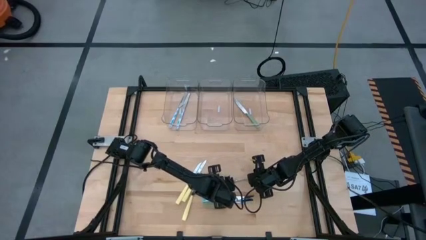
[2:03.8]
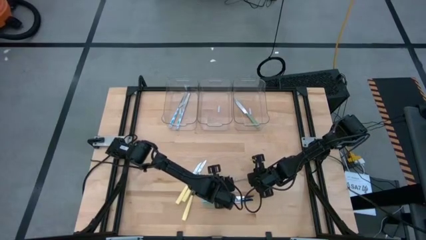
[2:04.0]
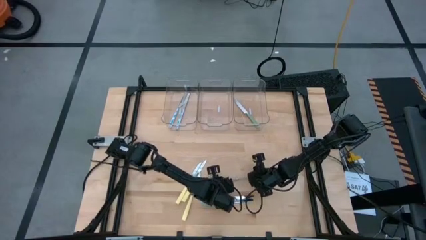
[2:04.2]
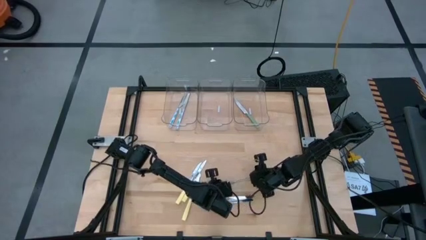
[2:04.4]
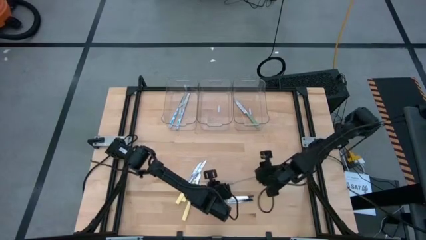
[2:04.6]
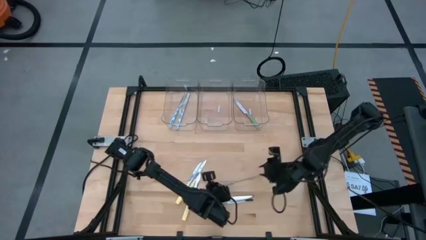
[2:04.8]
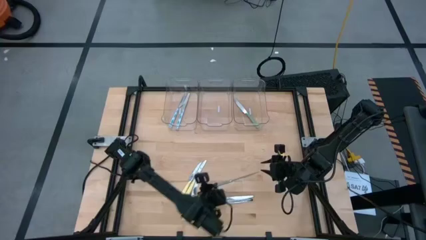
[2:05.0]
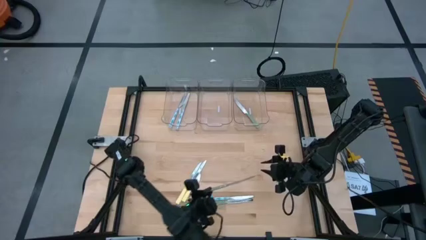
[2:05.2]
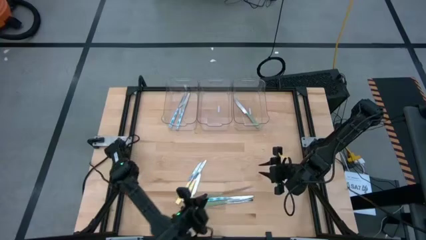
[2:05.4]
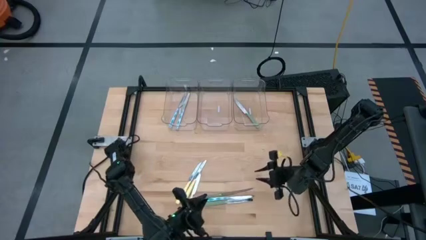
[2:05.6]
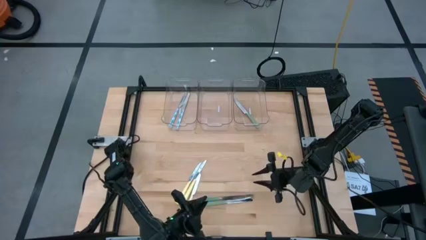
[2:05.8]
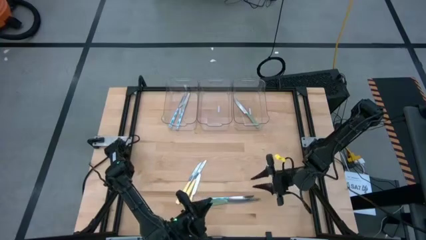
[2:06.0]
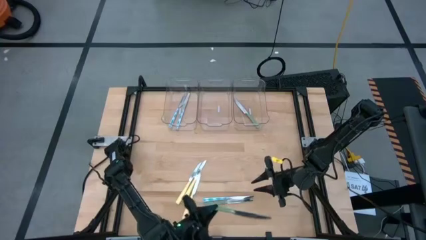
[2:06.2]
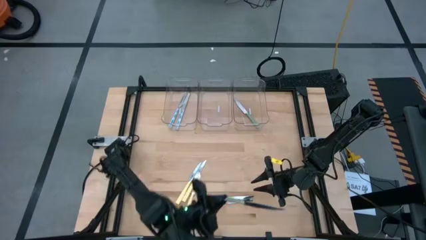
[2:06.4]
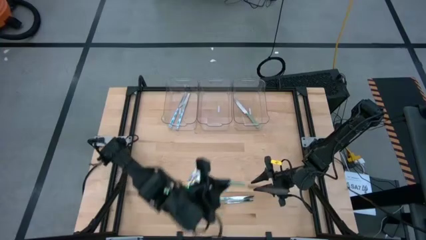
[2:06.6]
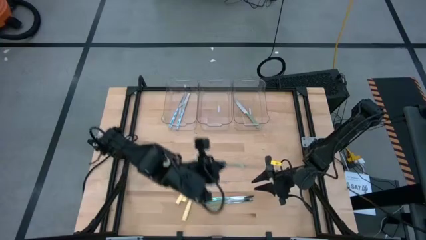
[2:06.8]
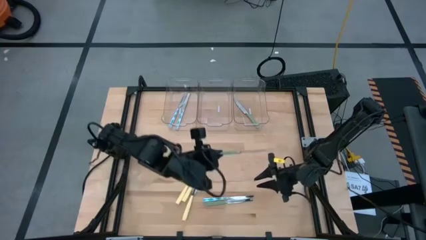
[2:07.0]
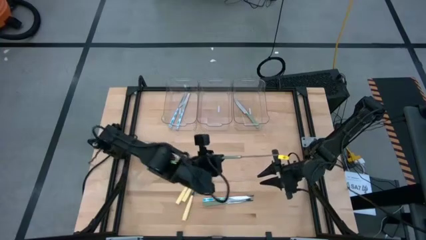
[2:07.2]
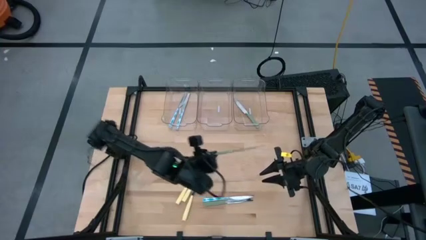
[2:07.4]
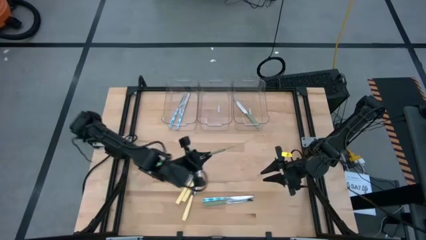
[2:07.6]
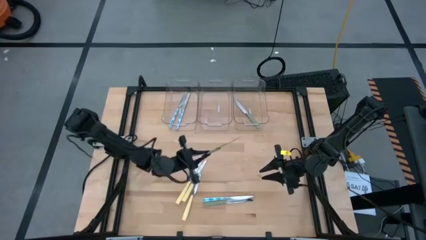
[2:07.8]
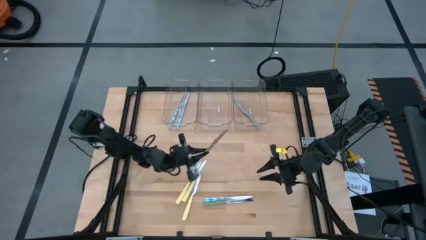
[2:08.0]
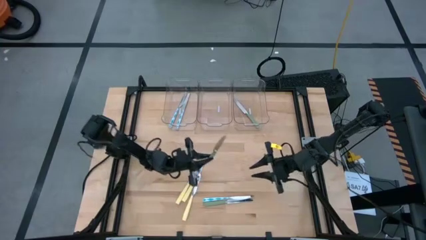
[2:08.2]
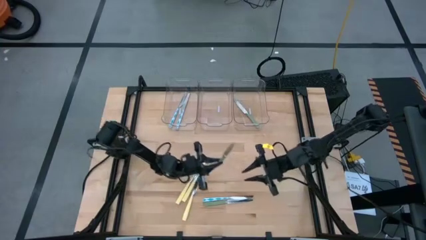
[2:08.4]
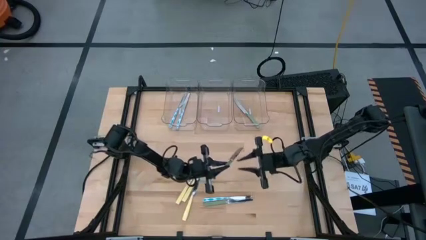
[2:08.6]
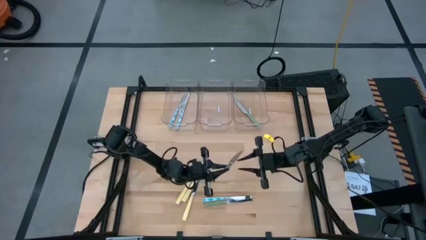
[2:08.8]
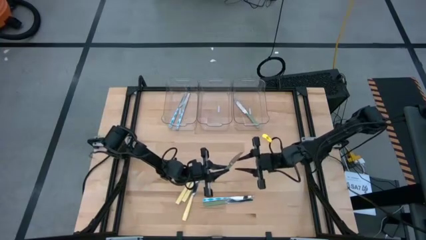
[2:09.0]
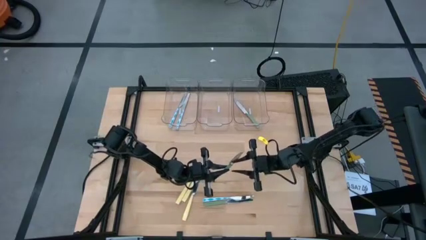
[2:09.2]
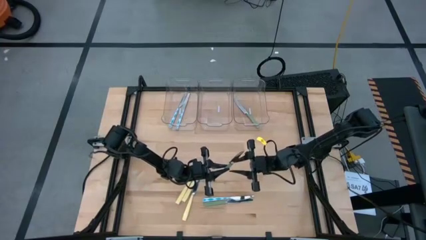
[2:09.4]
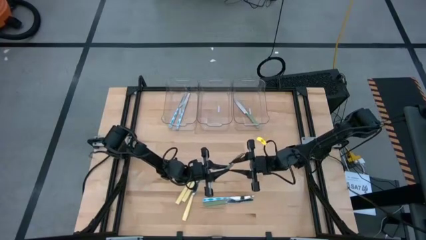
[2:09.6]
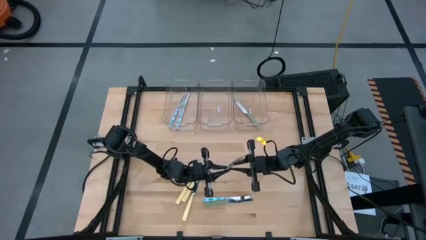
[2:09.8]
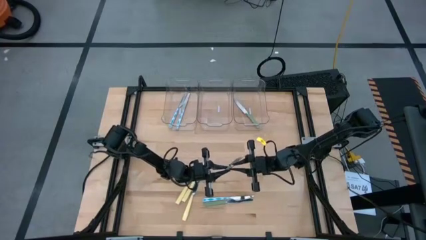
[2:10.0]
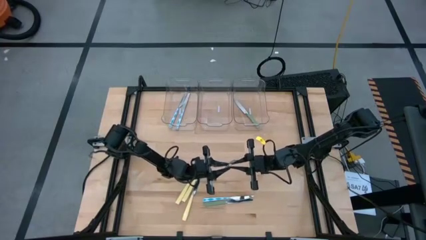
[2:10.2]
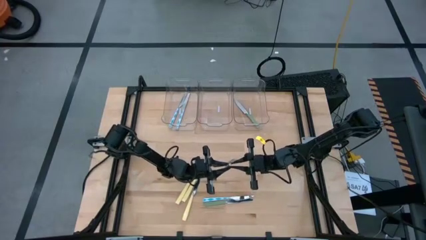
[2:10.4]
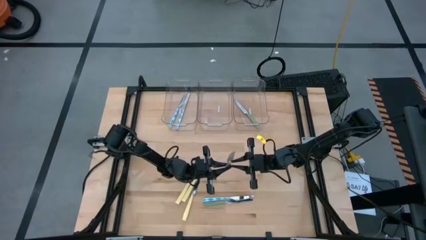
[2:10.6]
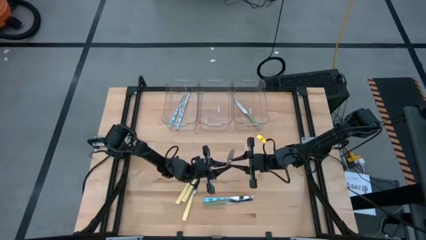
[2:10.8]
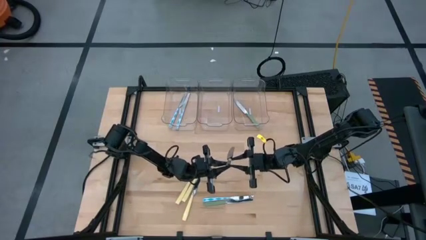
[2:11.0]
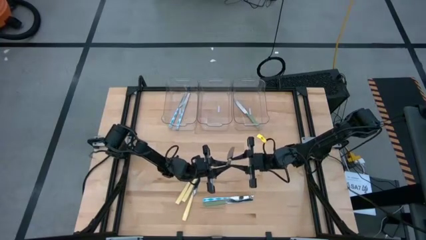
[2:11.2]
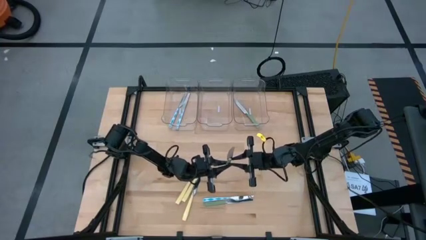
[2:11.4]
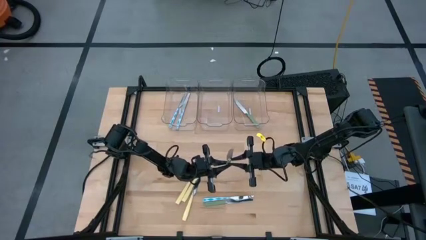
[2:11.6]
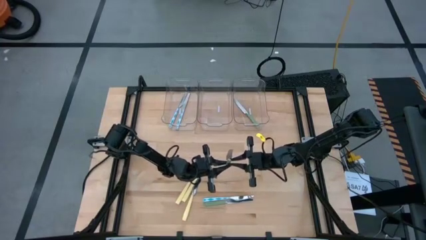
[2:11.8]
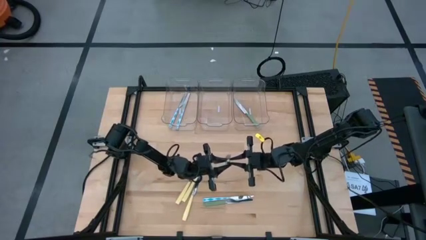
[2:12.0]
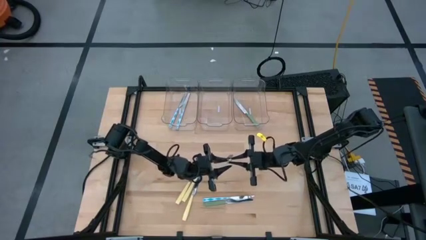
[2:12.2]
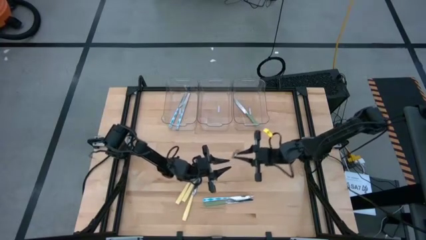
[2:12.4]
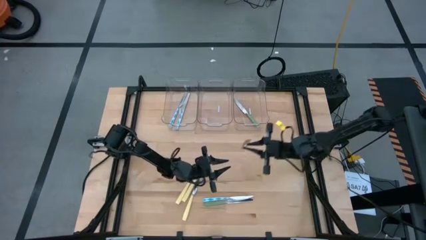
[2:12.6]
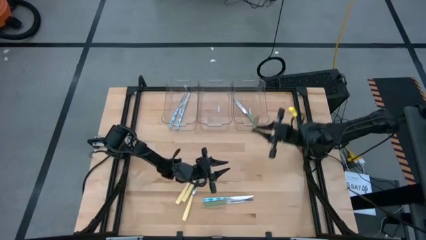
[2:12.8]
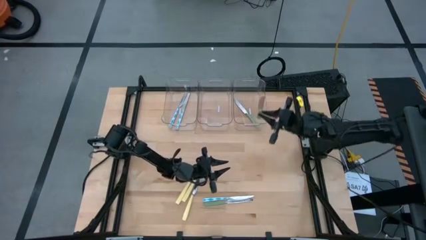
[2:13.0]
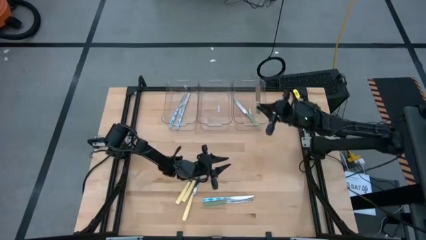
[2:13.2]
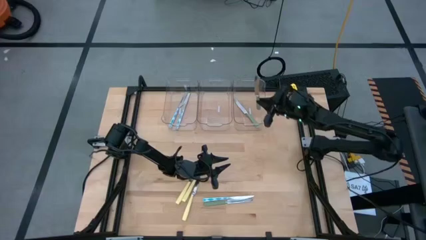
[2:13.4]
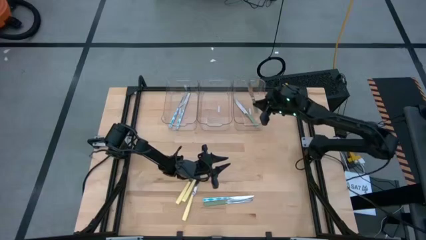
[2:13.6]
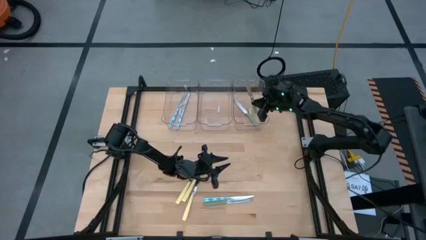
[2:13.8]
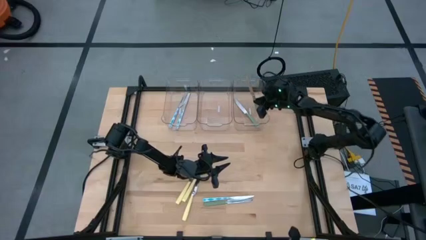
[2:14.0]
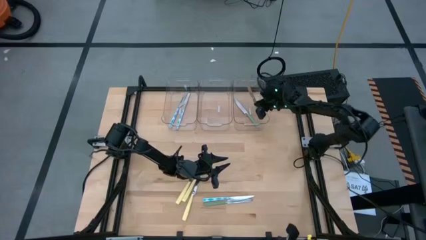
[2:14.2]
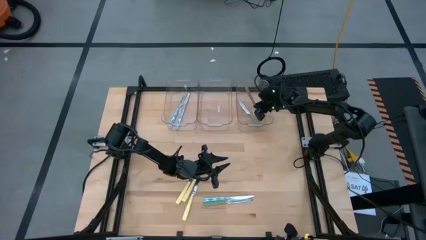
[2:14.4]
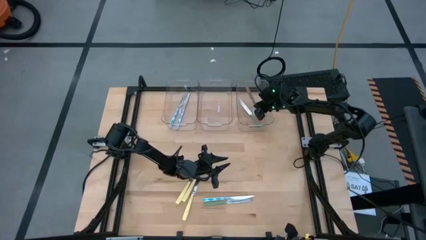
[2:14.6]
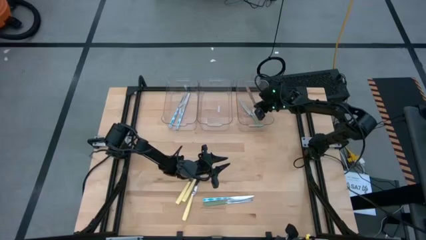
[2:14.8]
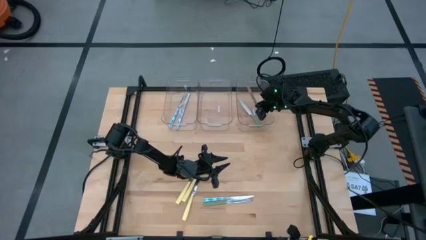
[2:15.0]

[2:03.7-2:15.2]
Task: Sort silverware by color (type)
Put the green knife into the right transparent bin

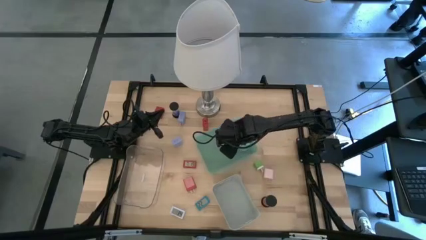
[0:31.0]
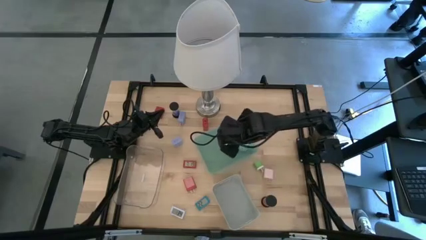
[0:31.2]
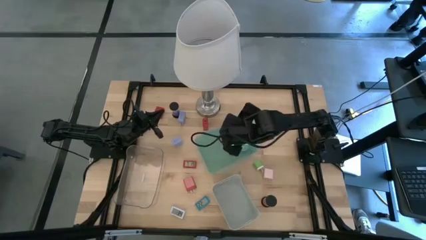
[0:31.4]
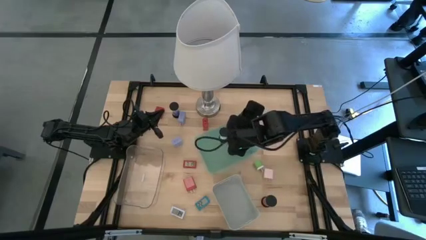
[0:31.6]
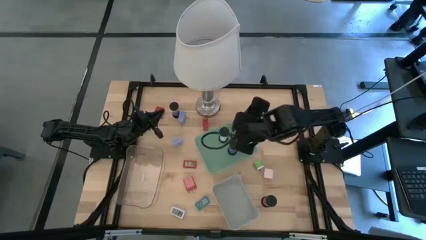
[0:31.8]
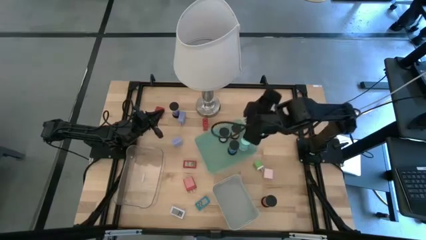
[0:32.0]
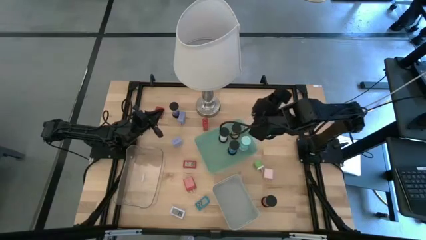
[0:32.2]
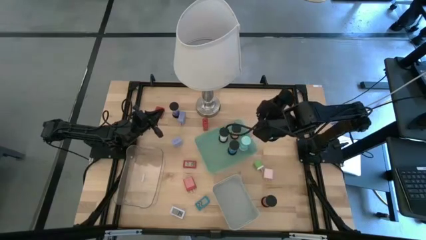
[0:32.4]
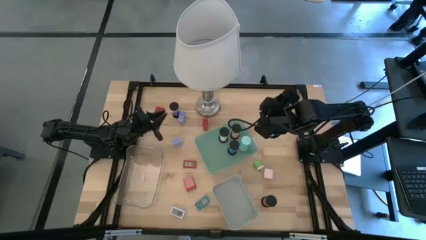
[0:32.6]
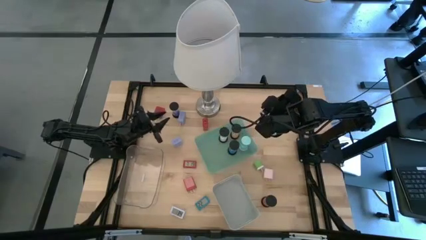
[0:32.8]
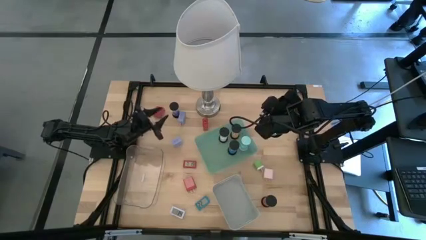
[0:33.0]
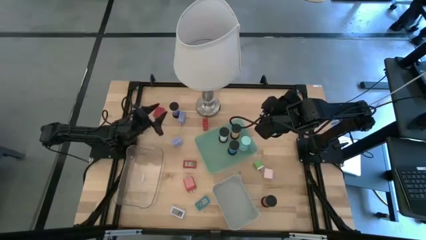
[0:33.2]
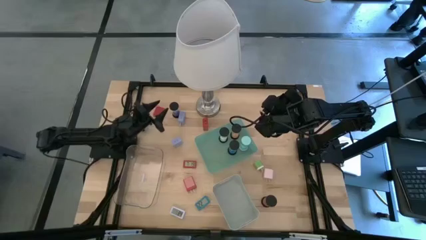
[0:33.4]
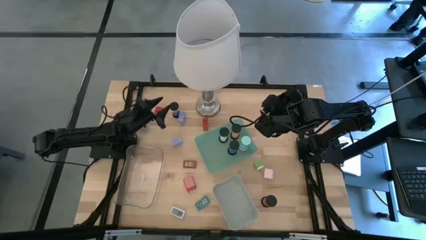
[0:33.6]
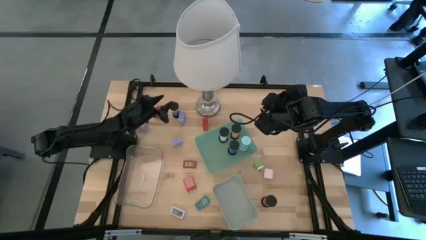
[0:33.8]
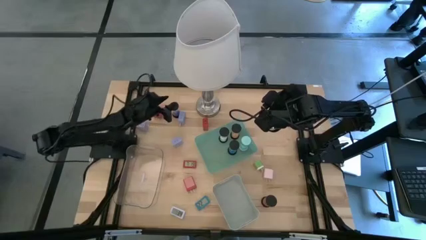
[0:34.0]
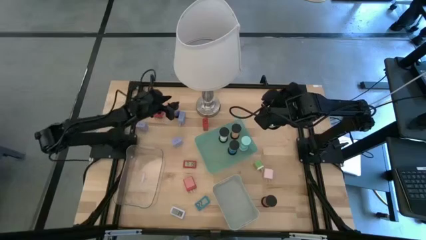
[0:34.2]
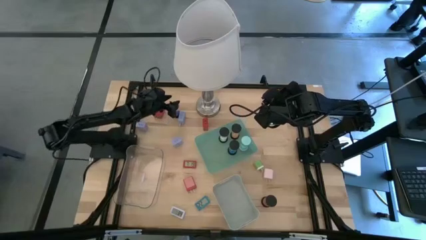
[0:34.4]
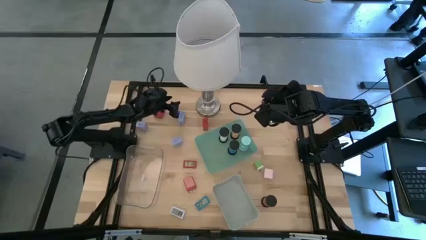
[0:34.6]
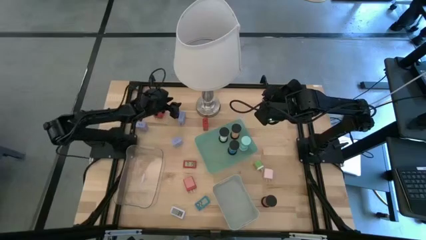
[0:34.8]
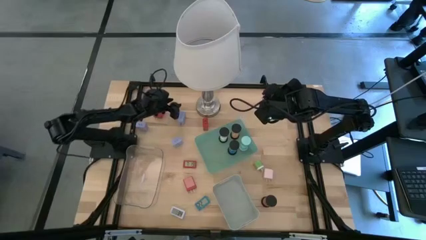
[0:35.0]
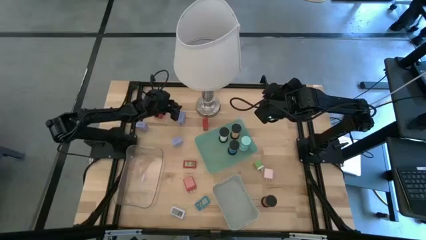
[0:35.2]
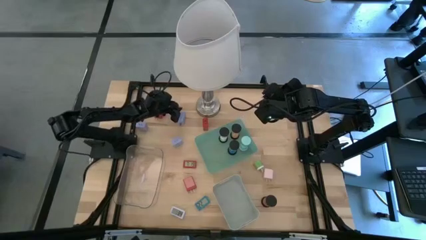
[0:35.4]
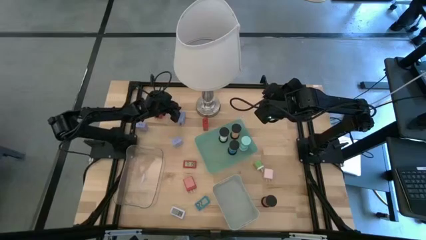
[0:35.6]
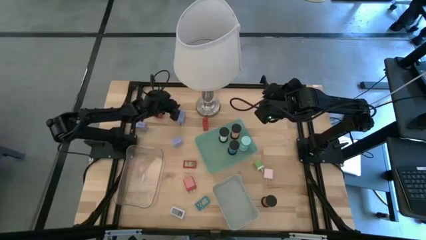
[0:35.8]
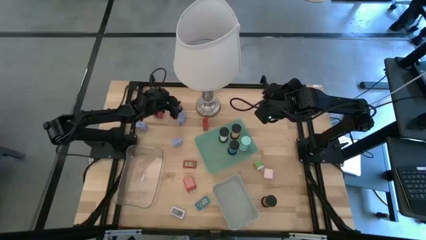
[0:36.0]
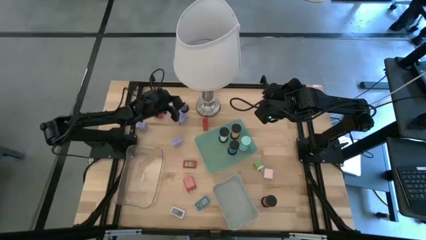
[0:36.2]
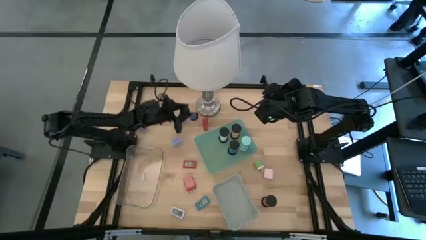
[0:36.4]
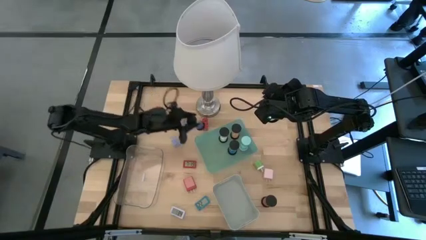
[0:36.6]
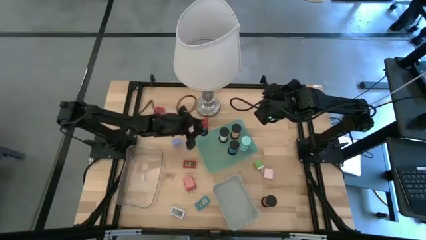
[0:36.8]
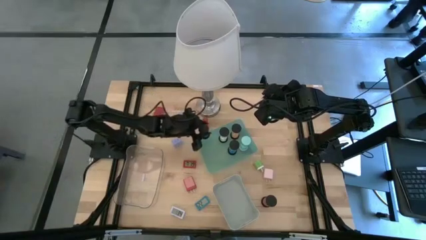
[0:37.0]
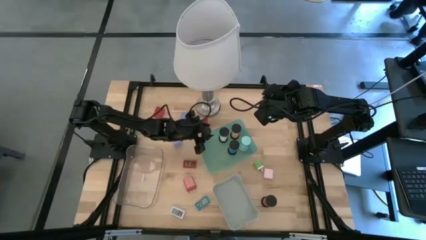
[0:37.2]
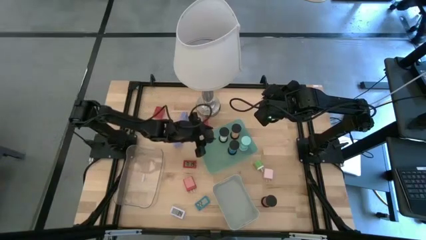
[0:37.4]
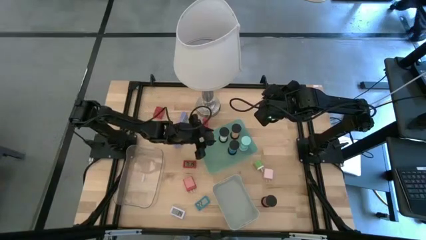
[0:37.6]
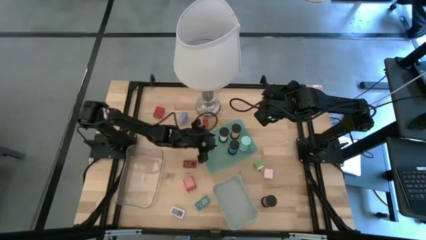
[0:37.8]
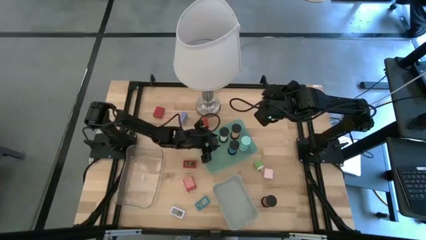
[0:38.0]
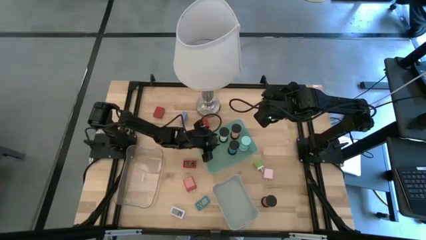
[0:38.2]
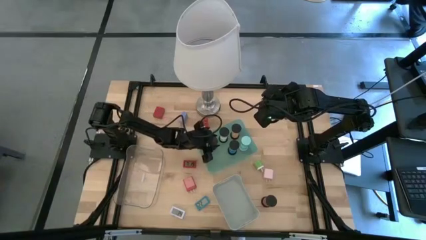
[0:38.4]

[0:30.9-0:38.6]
Task: Pick & Place Office items
Put the blue hourglass into the green bin
